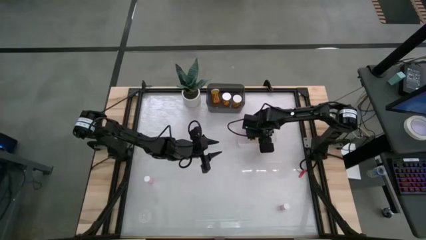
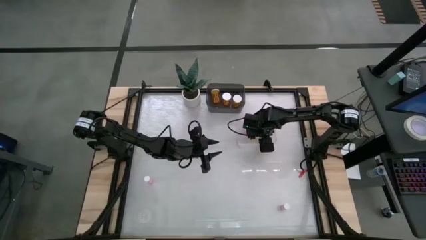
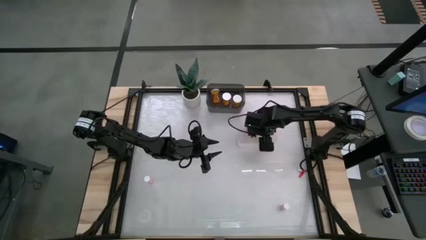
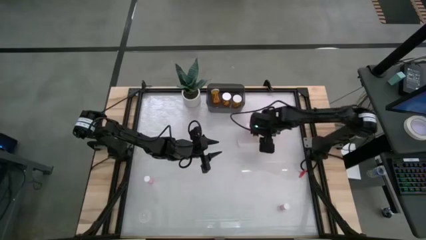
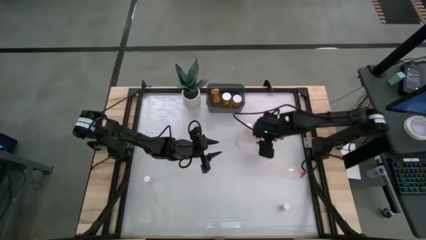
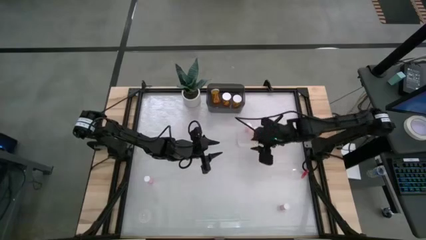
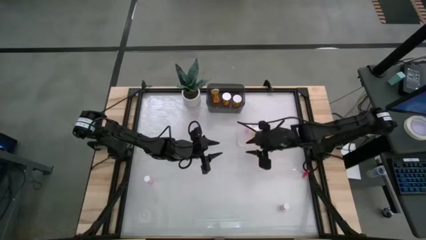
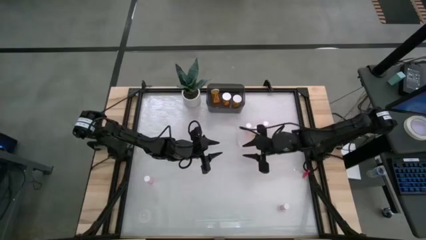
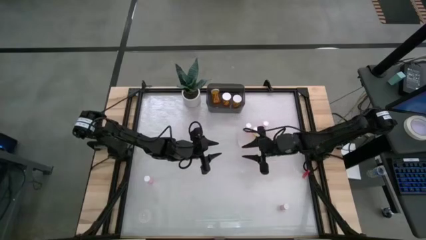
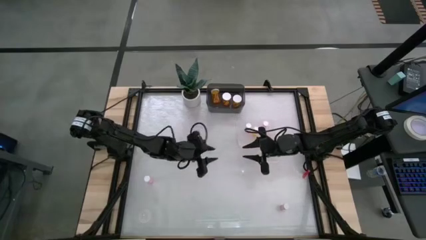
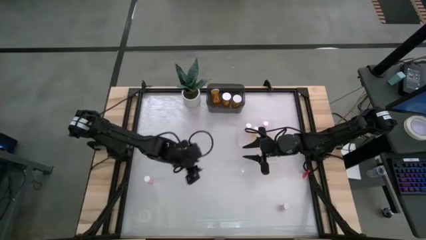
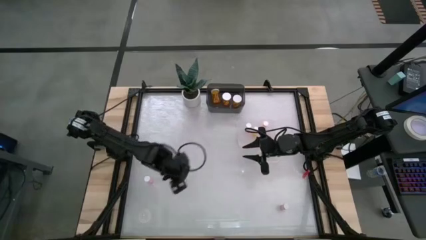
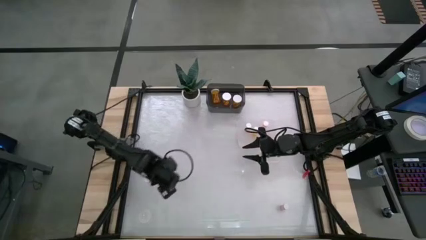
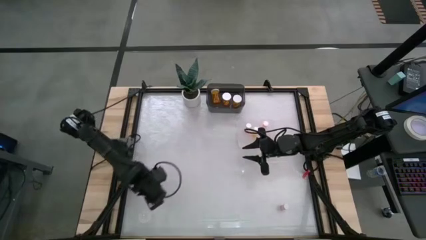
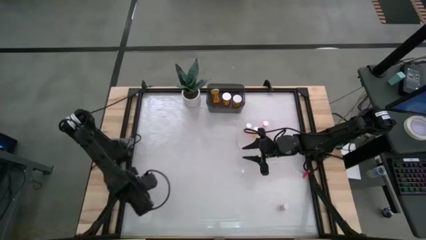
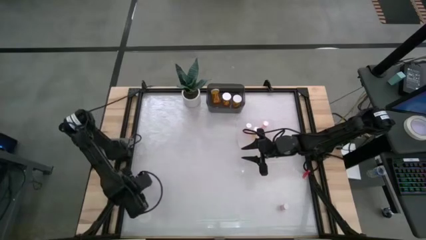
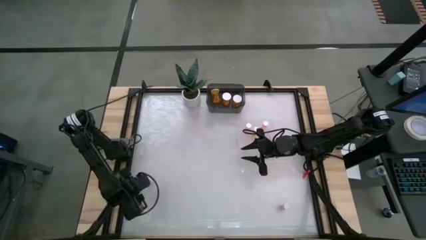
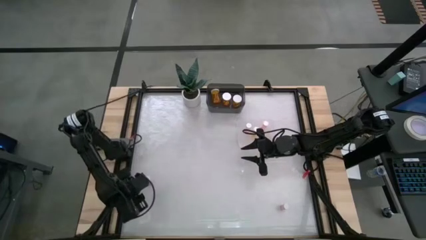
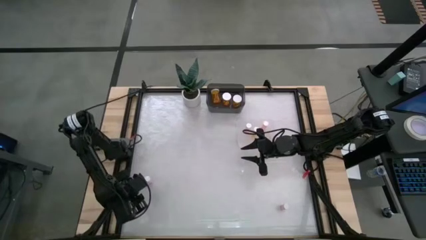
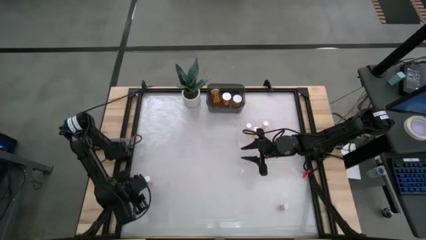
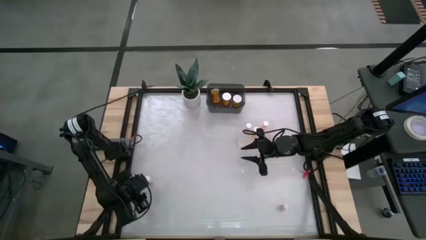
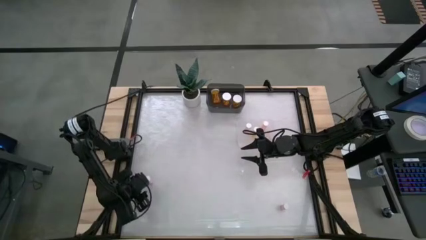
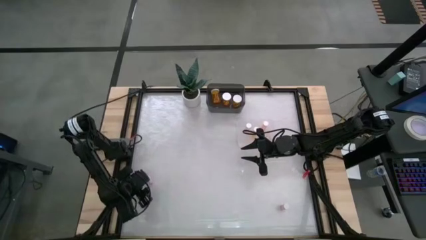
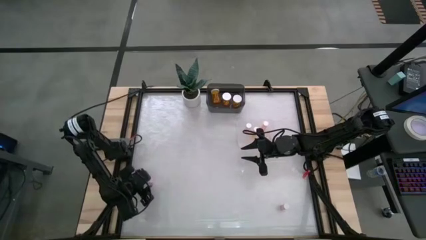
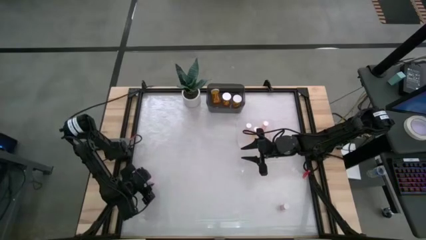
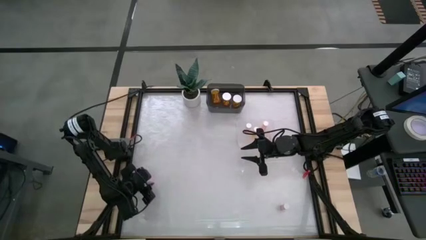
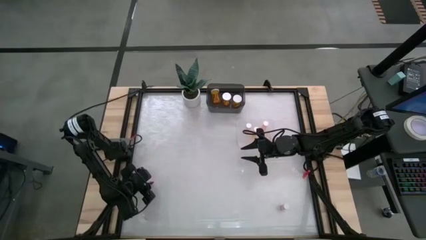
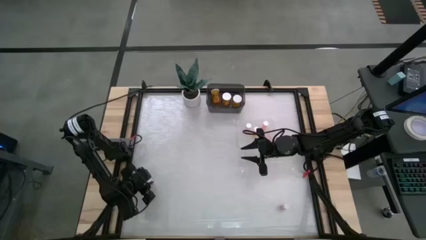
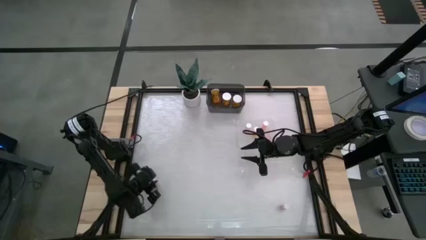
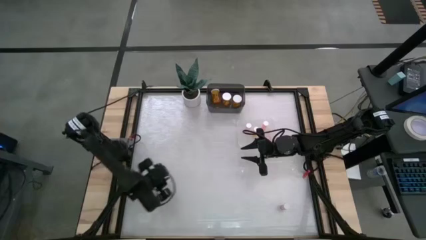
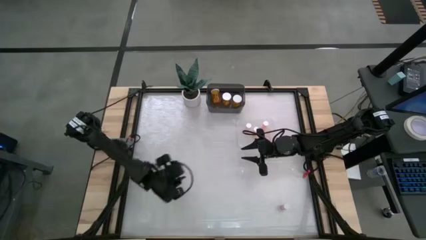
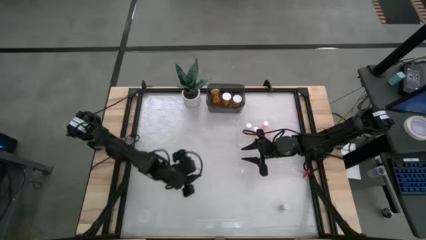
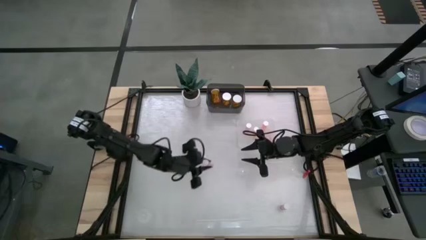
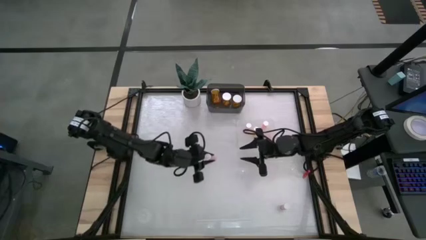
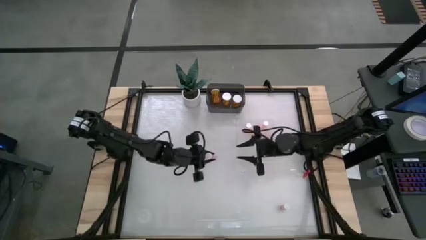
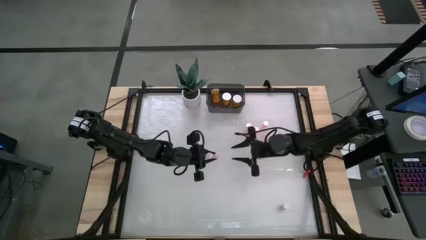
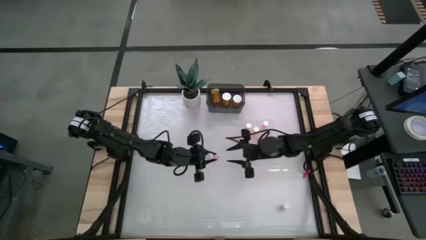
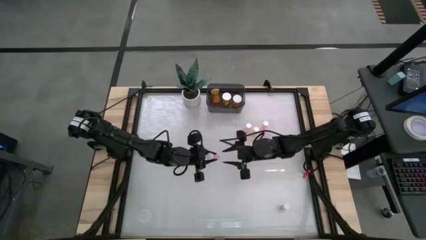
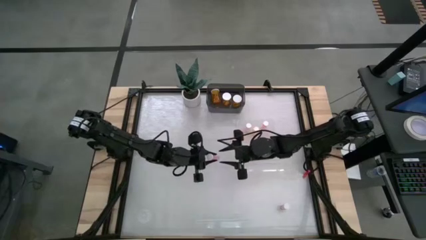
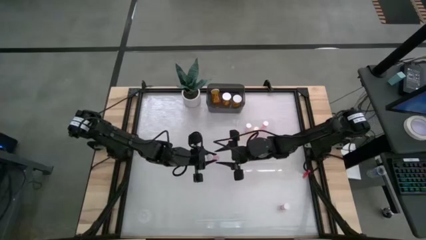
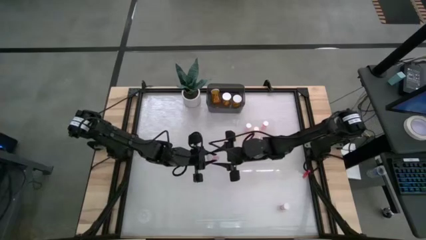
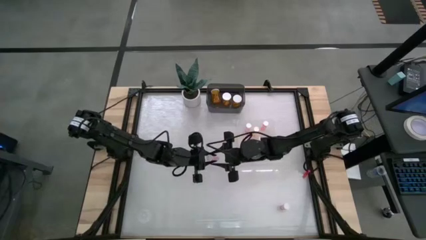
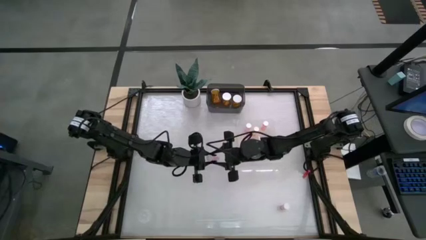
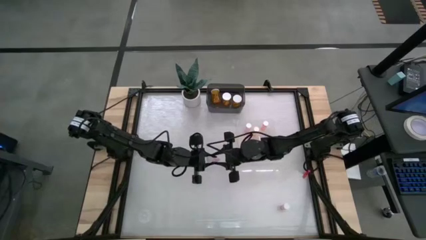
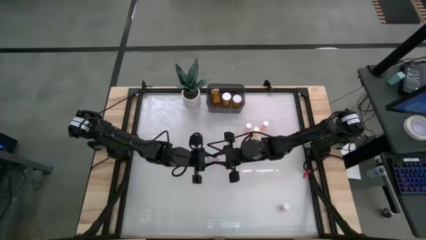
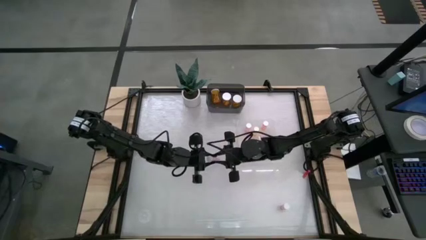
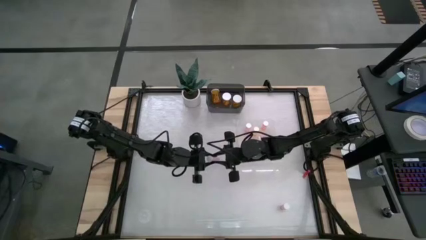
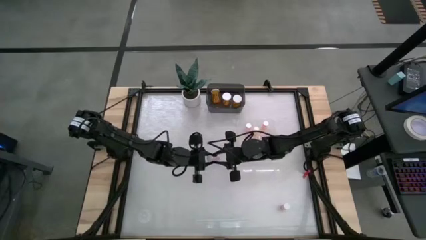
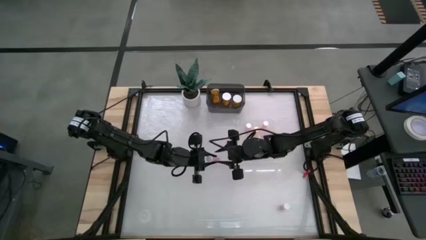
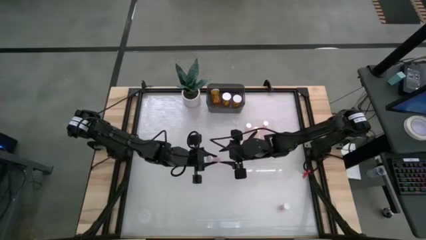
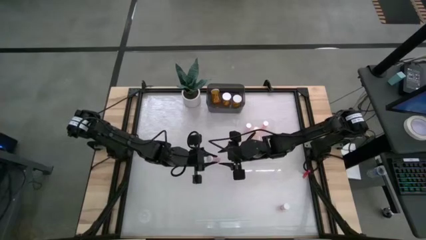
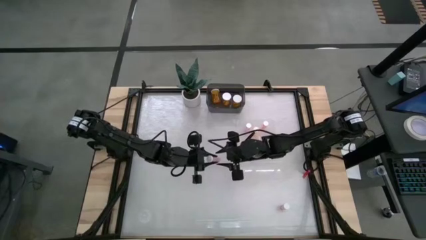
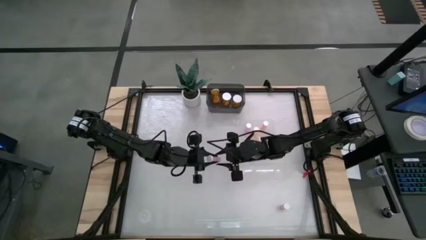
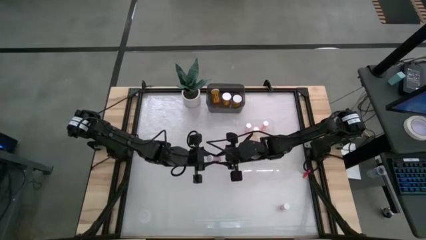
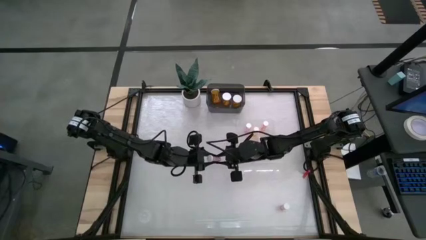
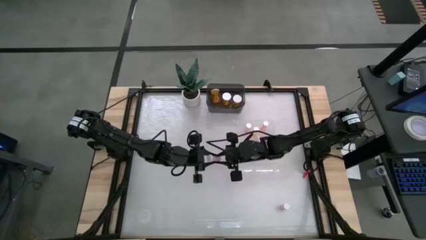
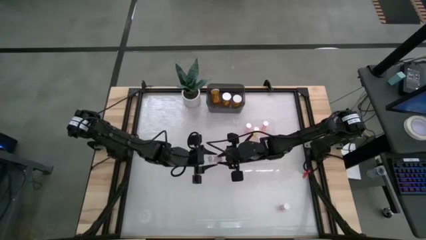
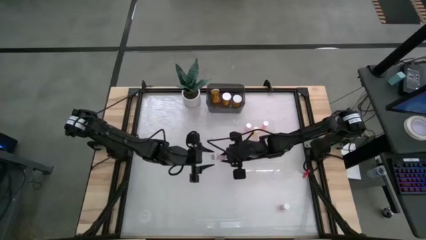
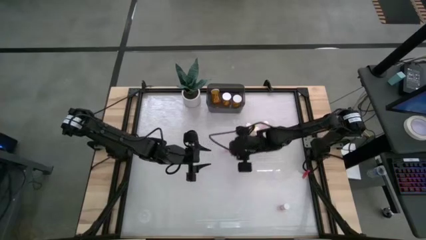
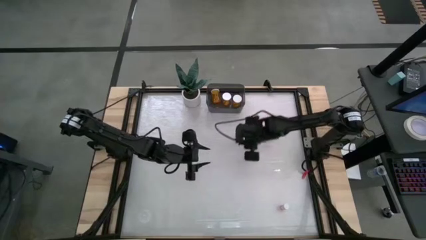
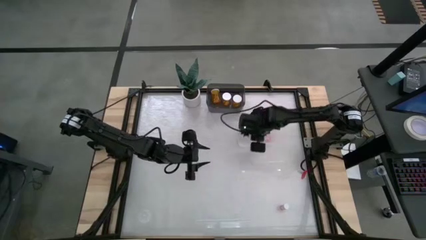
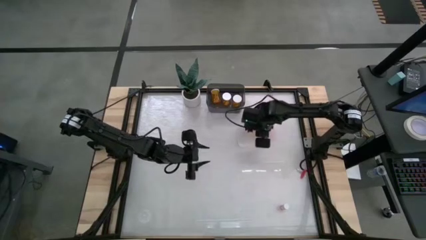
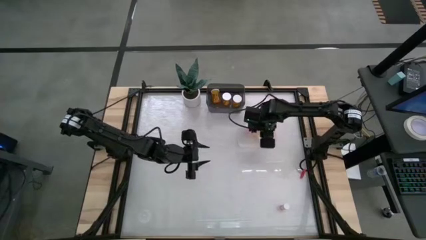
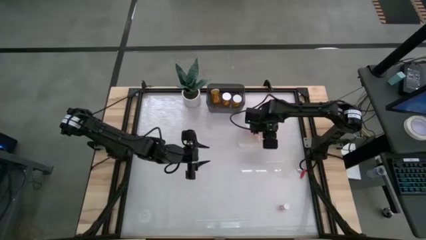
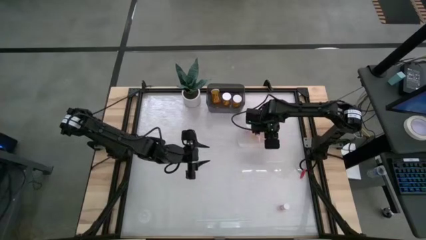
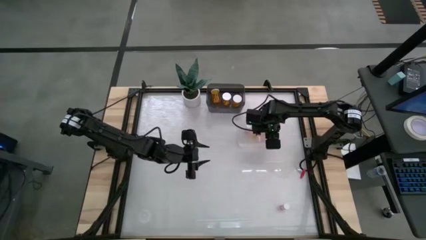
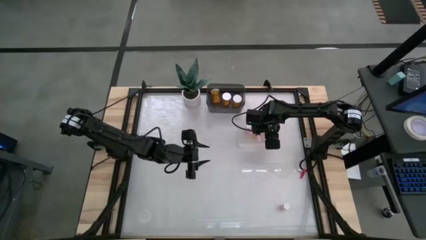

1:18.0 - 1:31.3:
Task: Pick and place medicine bottles into bin by pill shape (circle, oval)
Put the small pink pill bottle into the white bin

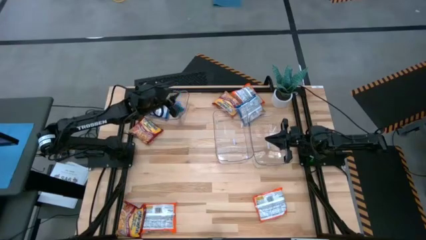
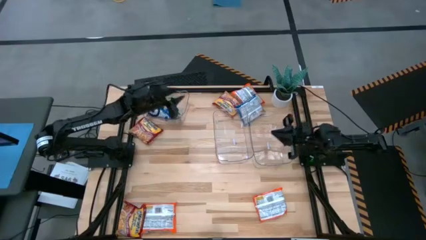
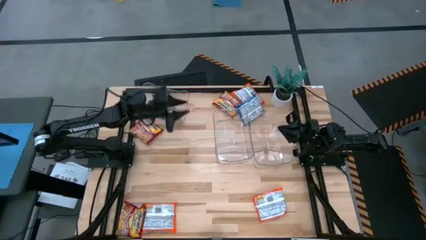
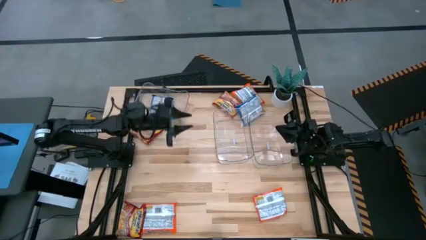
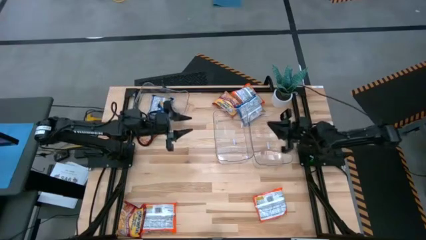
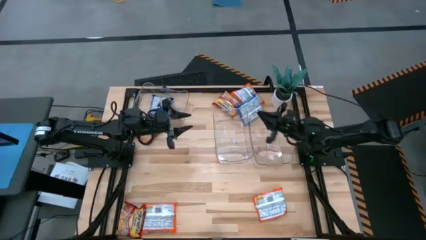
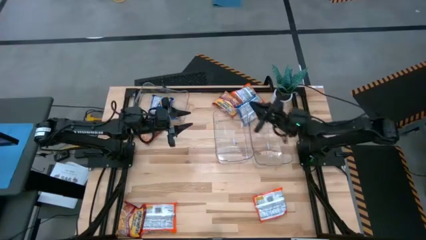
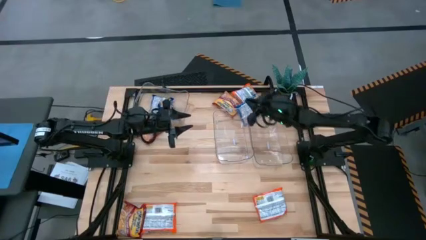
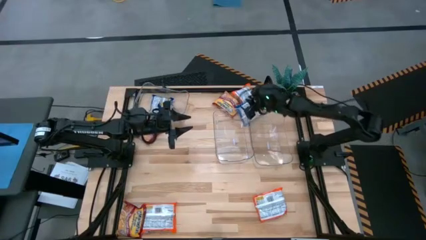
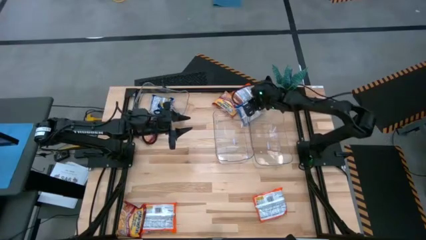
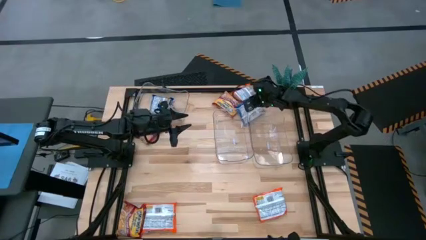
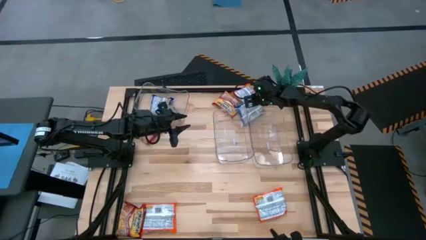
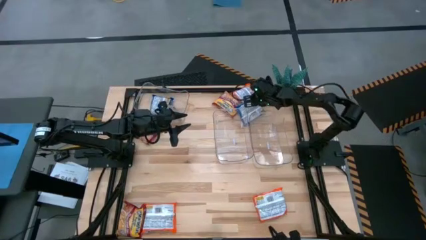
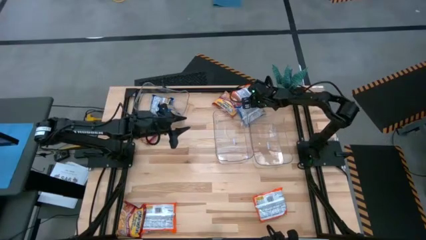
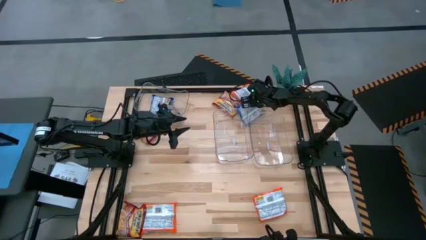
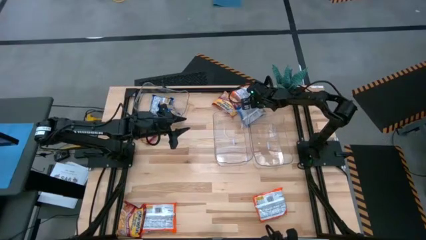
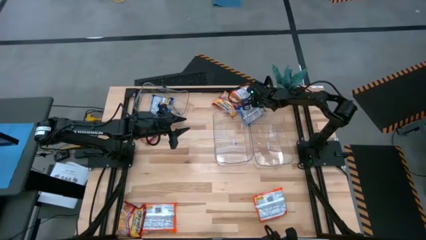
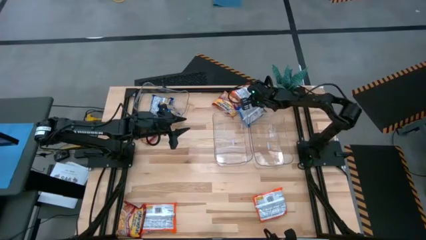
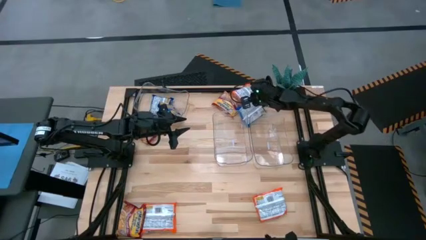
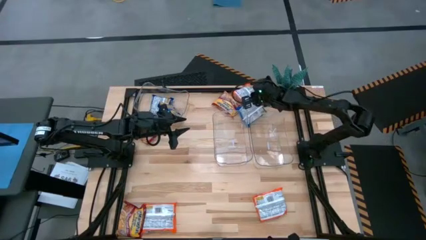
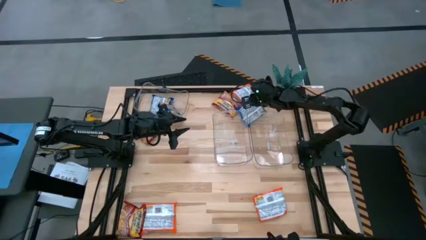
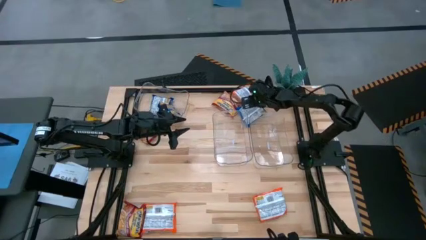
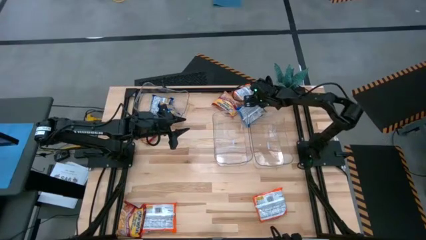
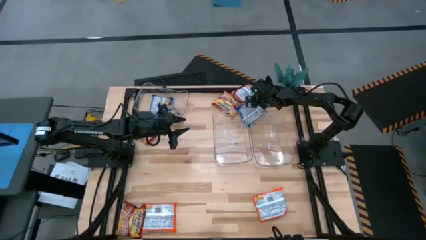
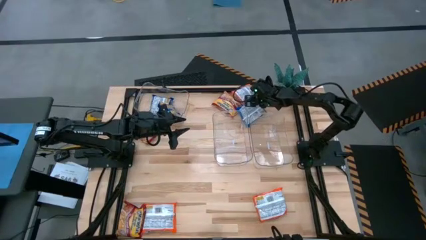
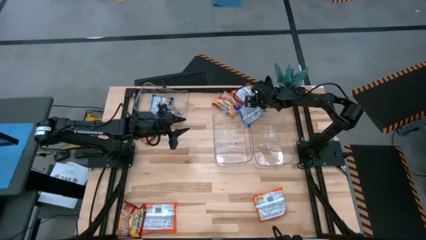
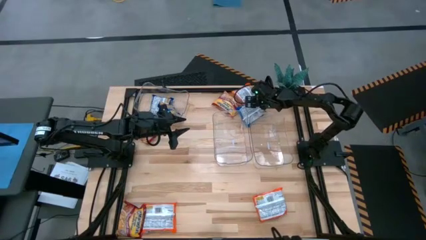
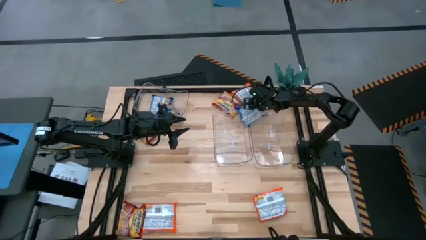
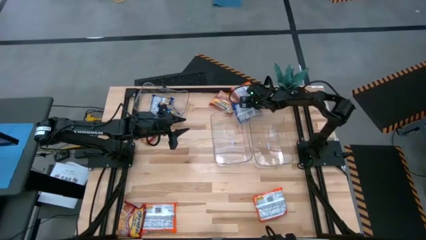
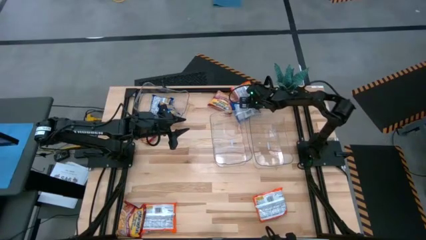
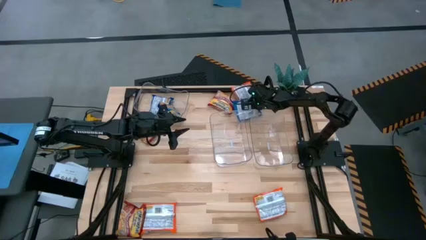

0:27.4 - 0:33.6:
Task: Sort Maruchan noodles
Put the blue noodle pack into the top left transparent bin
